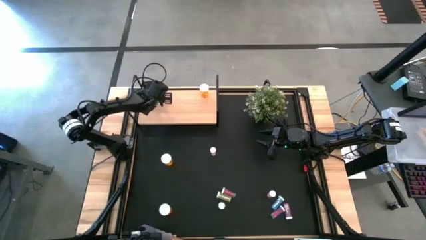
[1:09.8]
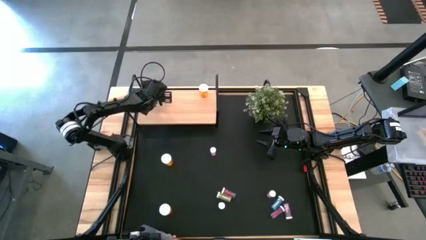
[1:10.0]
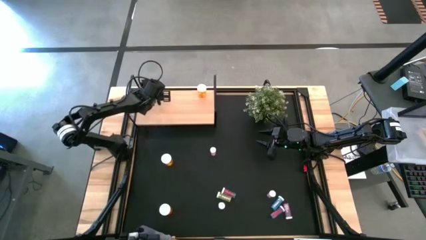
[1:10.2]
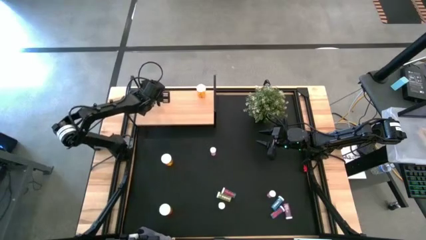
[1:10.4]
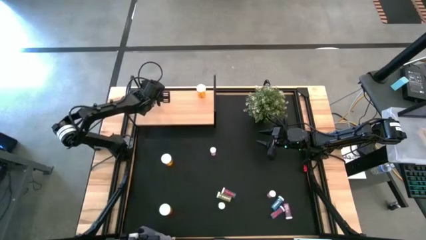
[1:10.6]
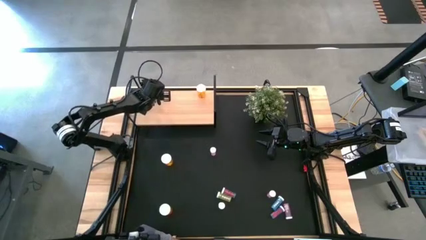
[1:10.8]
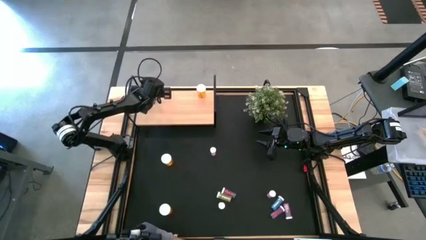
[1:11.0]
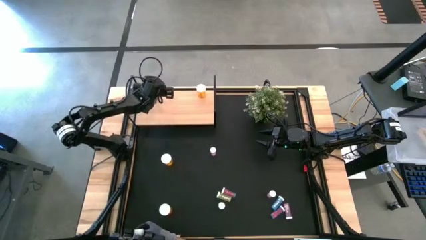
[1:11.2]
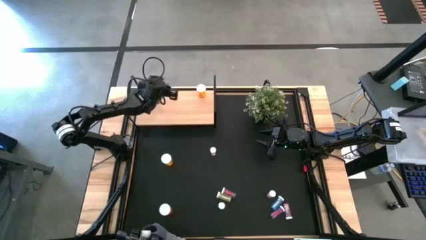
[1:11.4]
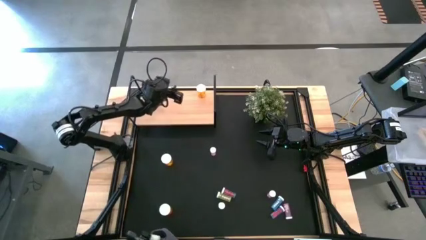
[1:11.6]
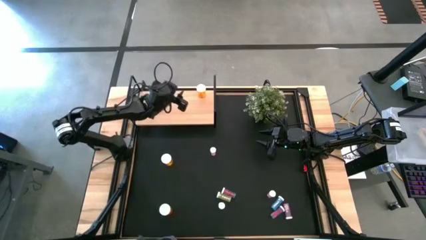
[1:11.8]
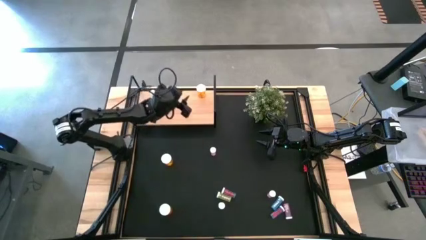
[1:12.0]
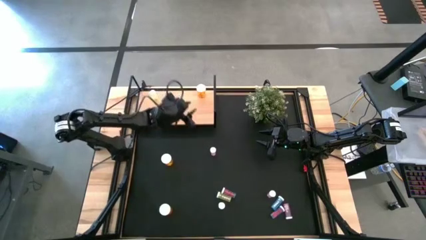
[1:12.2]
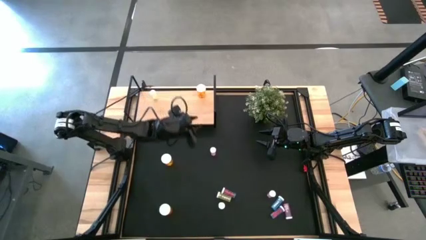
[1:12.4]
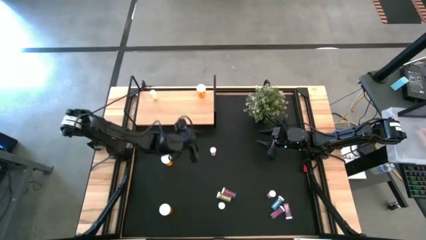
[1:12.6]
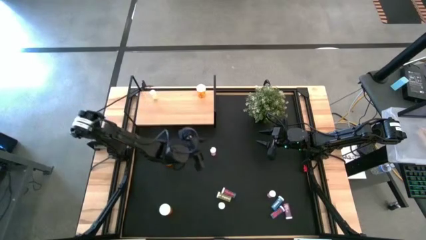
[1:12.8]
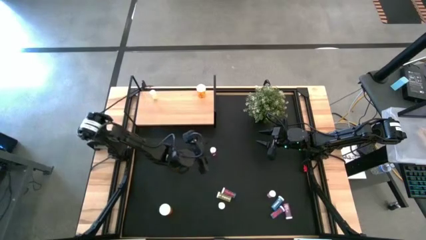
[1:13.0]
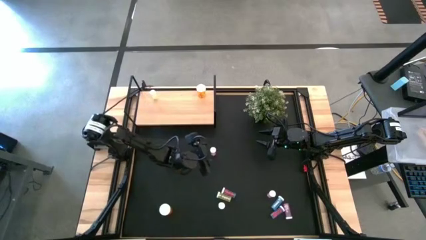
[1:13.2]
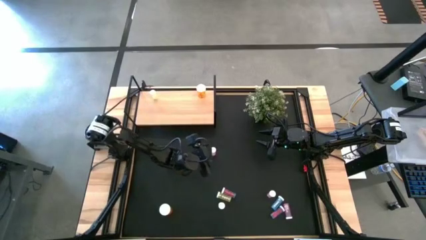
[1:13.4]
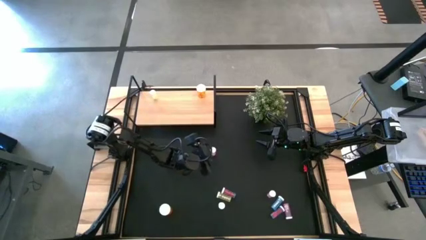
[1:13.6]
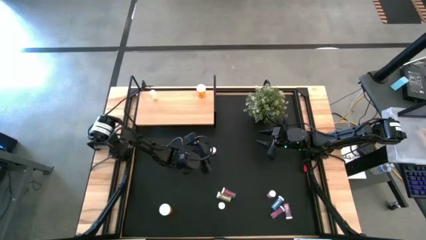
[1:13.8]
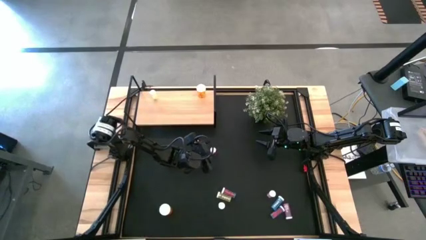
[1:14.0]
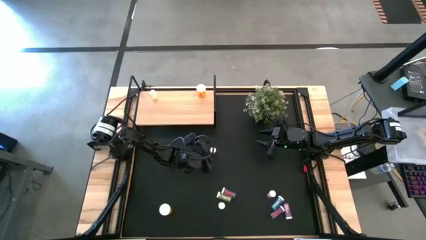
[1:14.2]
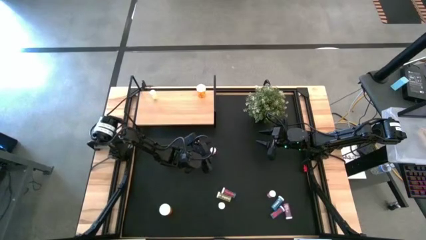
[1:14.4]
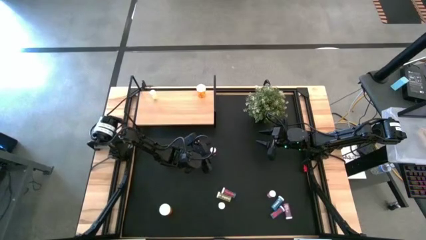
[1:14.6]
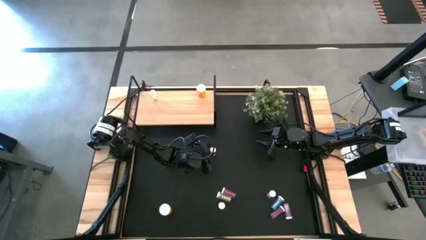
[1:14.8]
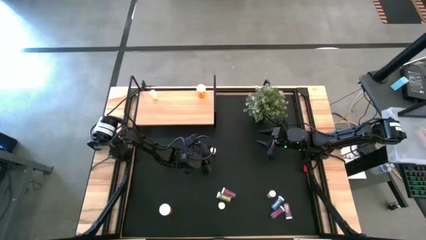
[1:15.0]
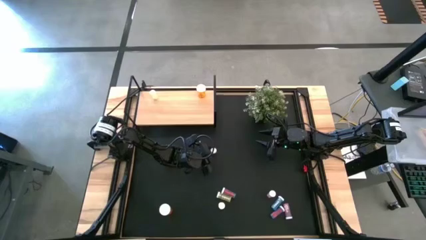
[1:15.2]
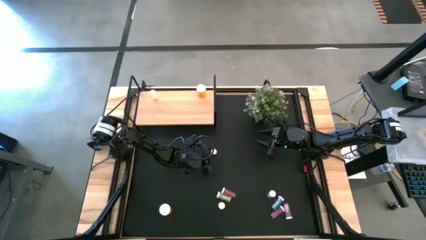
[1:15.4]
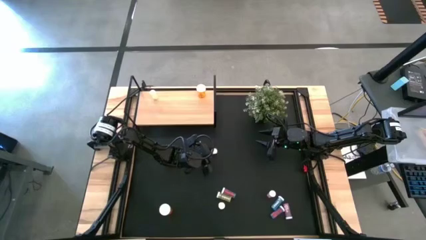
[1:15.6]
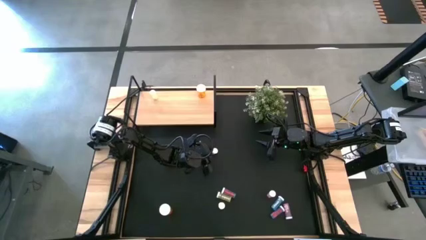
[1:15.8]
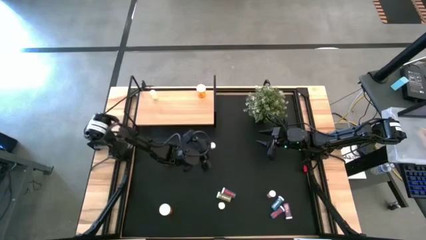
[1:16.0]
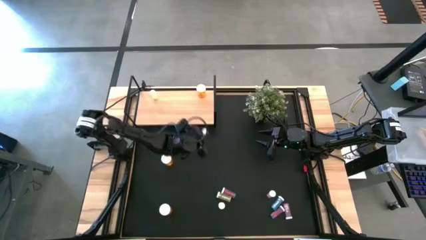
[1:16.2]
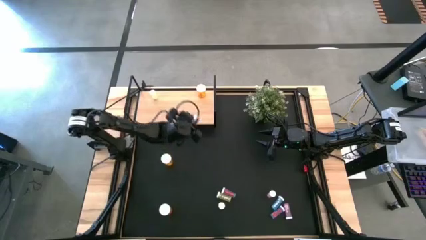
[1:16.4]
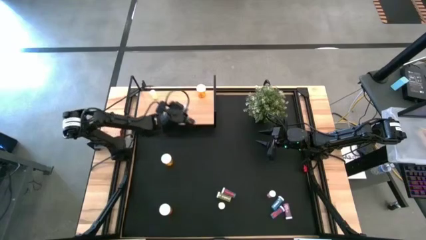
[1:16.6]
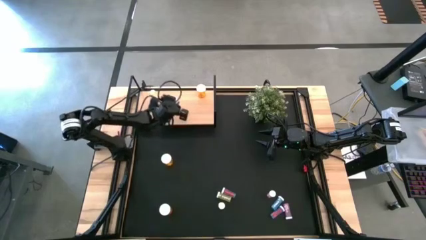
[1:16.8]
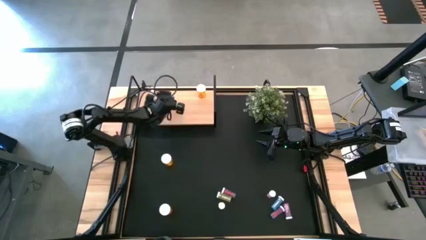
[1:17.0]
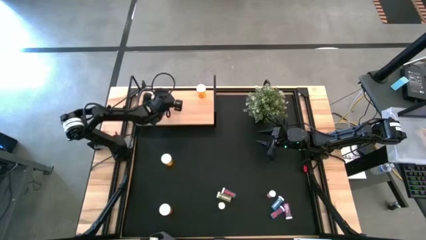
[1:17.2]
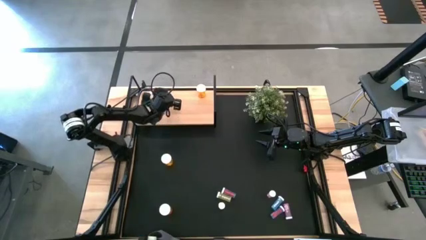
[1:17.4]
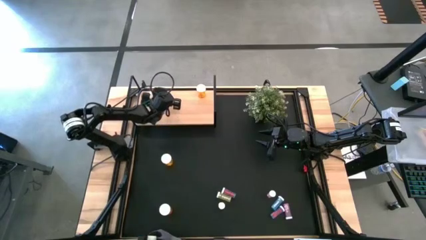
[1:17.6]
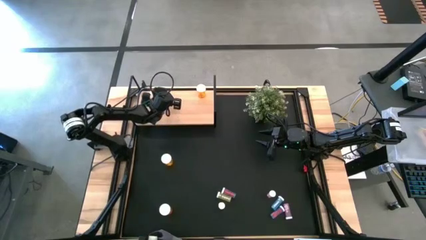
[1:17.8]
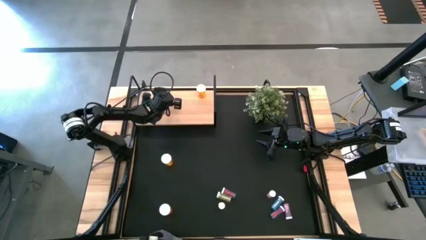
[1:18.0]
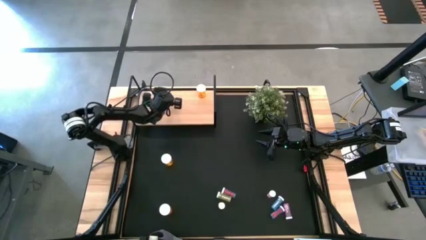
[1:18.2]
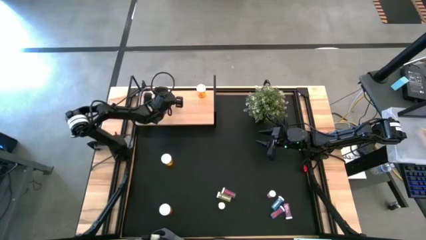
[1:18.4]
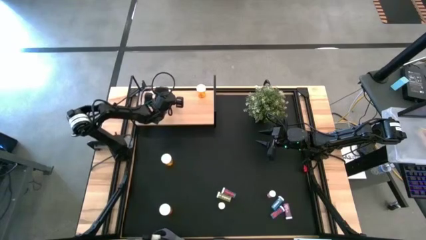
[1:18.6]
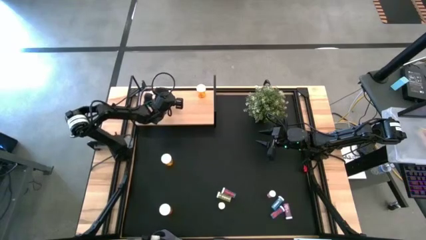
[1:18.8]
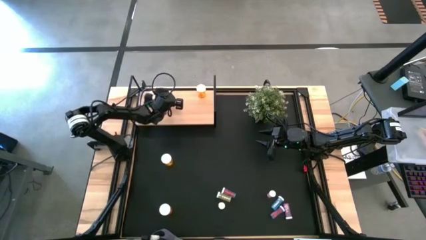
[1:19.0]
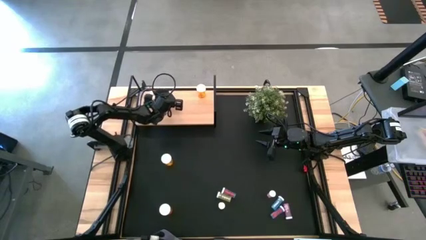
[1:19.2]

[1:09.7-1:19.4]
Task: Pick and place medicine bottles onto shelf by color
Put the top pink medicine bottle on the shelf

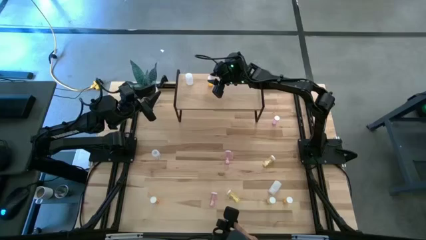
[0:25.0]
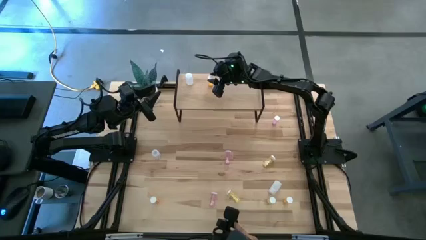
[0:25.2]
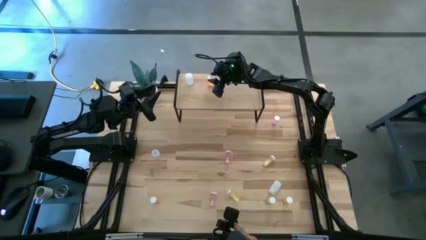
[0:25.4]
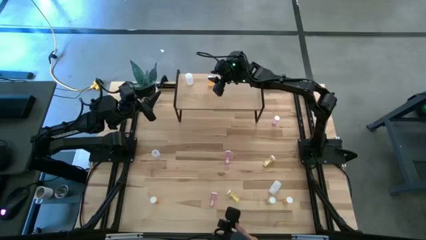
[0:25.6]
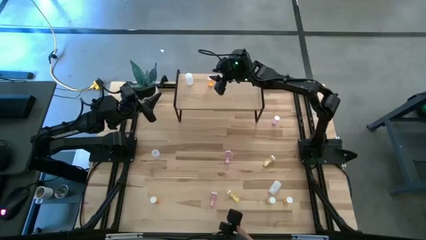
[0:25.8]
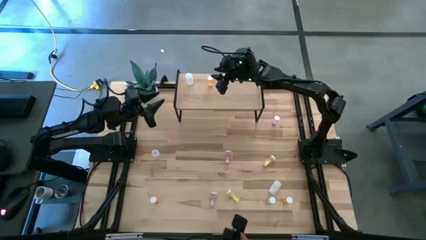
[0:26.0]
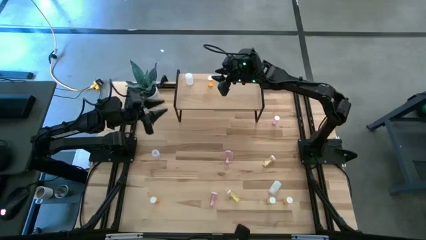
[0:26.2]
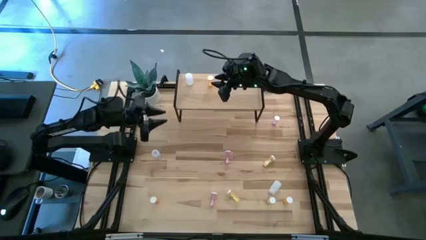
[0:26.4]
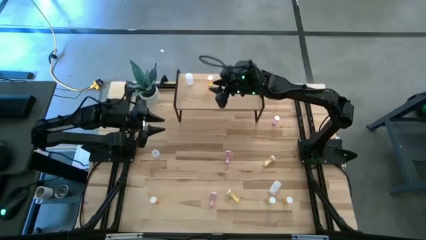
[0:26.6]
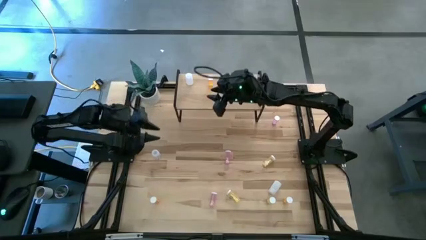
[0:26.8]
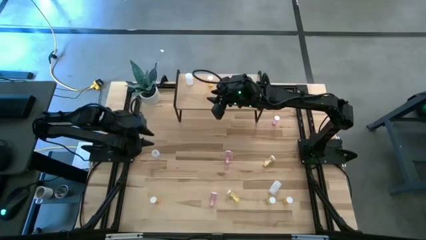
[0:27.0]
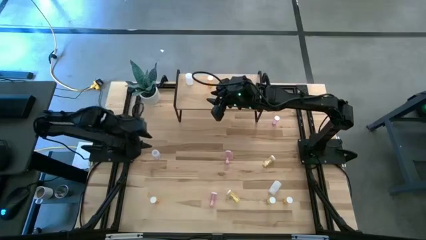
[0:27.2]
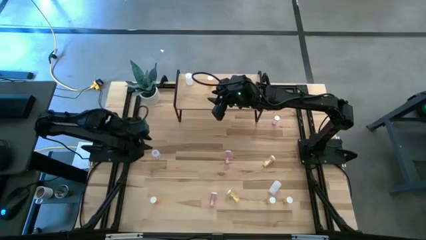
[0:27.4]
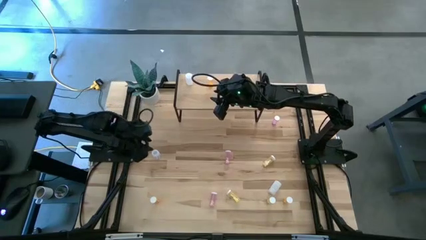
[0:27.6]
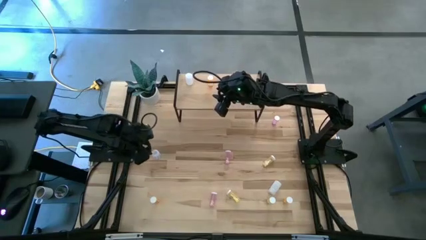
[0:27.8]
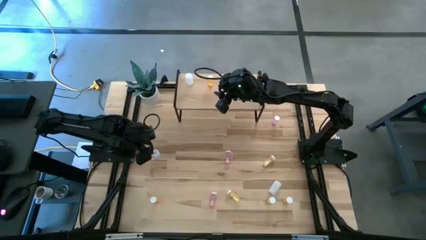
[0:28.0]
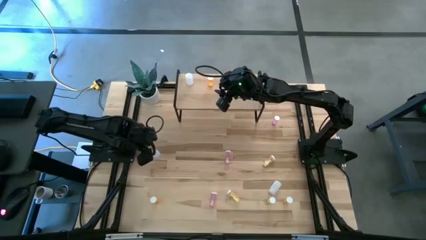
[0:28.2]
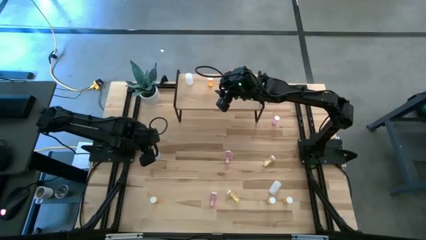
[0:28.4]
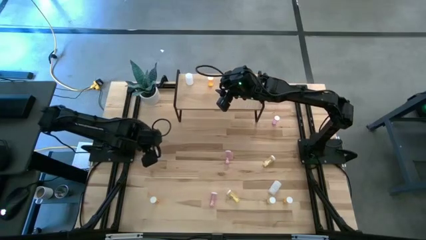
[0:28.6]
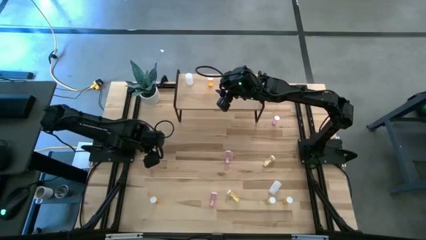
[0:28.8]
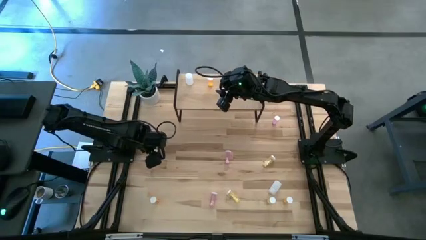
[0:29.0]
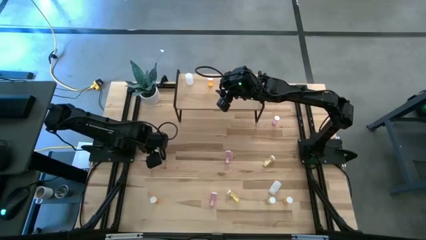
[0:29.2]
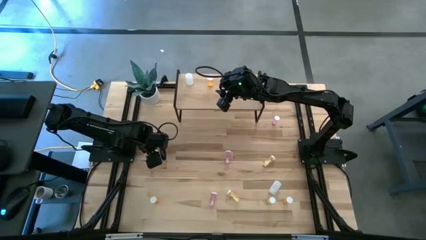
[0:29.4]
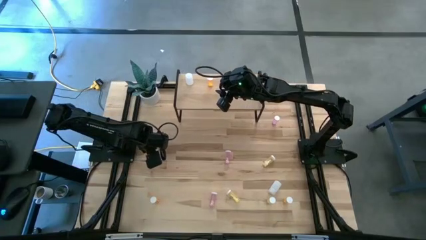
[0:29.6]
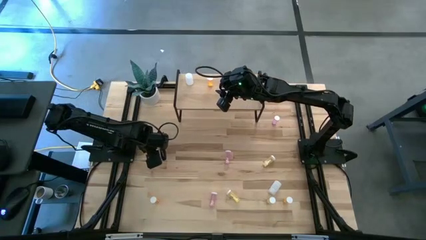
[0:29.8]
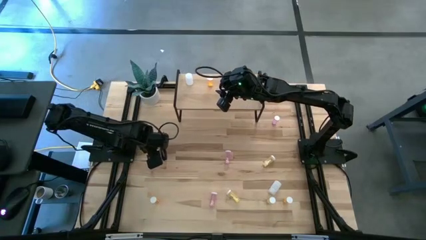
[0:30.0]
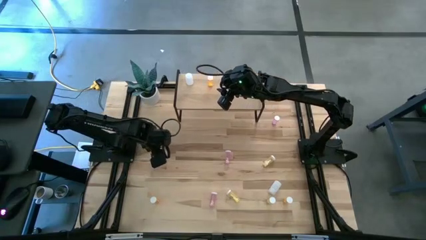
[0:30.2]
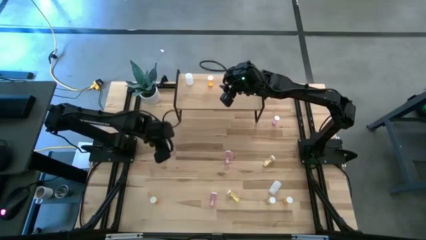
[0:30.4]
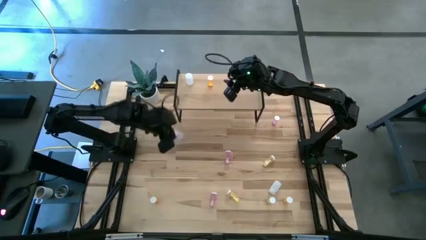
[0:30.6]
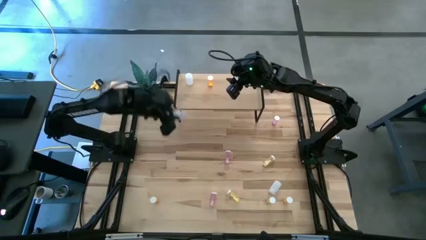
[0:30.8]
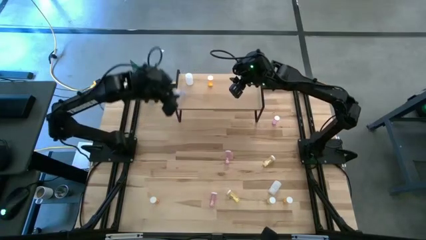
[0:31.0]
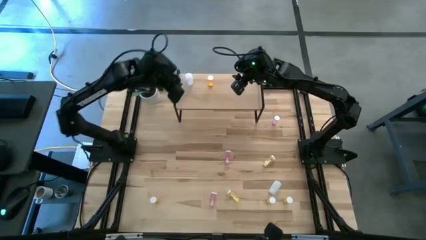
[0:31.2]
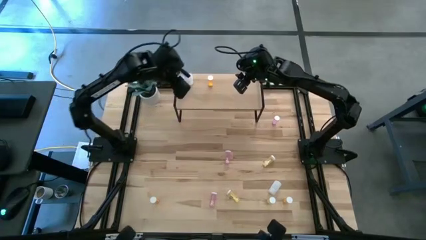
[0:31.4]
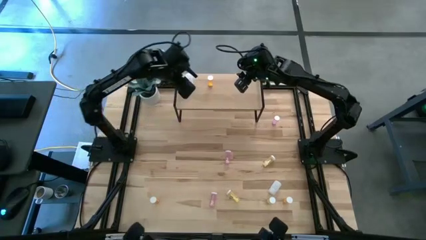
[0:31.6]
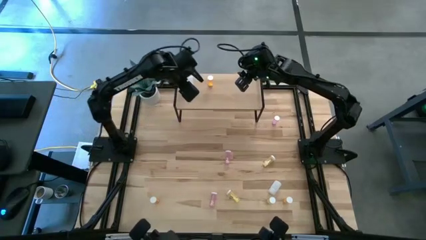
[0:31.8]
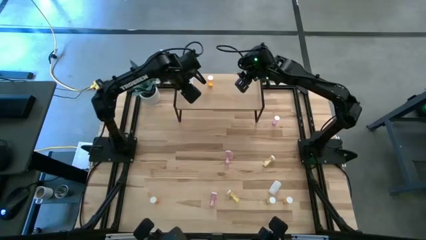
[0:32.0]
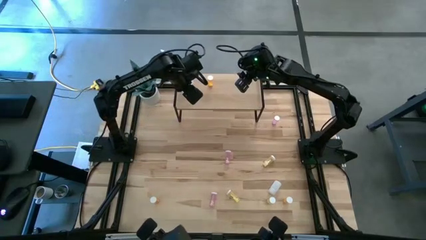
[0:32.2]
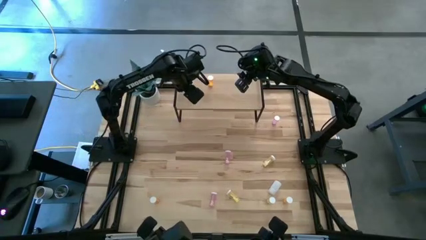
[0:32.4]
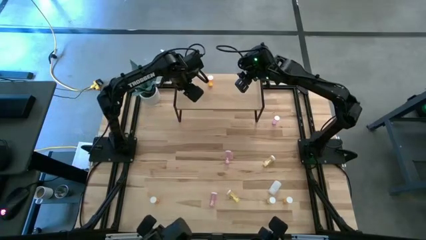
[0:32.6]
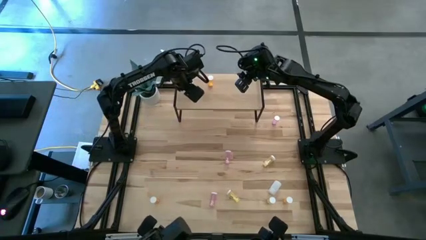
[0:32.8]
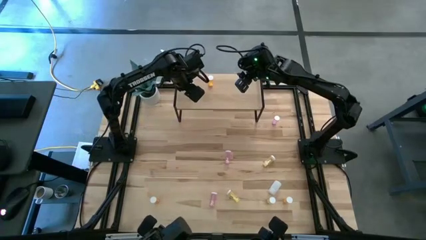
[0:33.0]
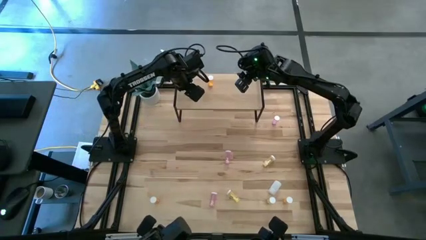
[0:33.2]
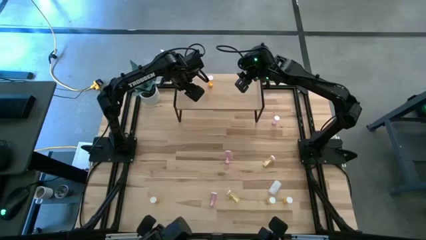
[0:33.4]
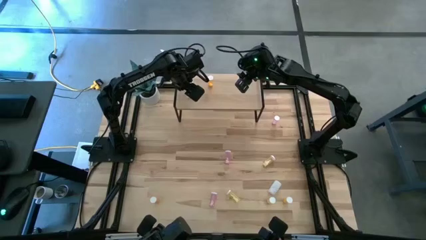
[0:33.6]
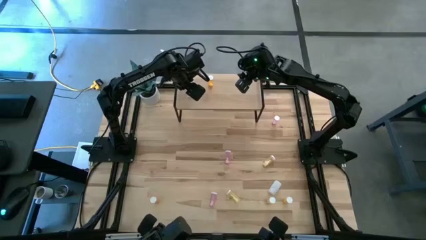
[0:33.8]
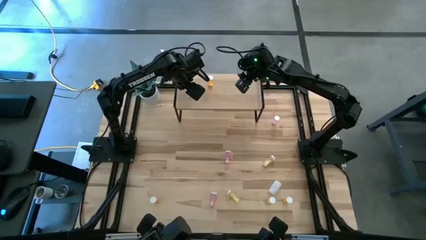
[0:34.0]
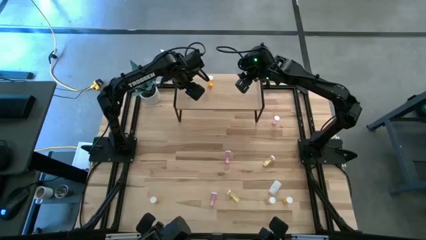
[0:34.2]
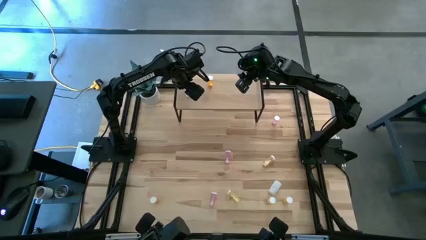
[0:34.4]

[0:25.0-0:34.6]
Task: Pick and place medicine bottles onto shelf by color
Put the top white medicine bottle on the shelf aligned with the other white medicine bottle
